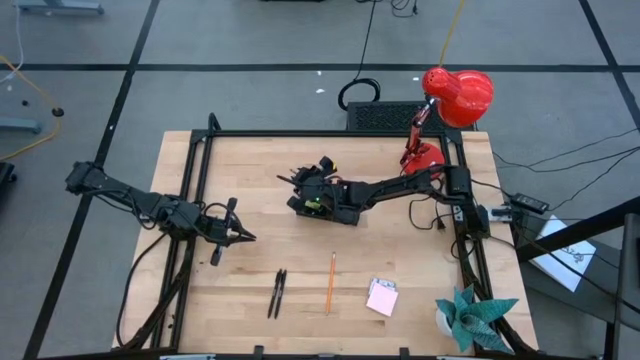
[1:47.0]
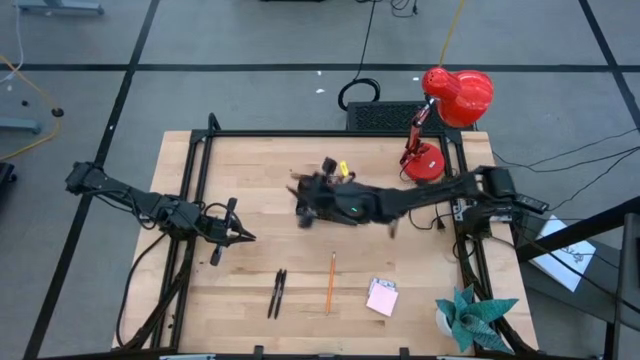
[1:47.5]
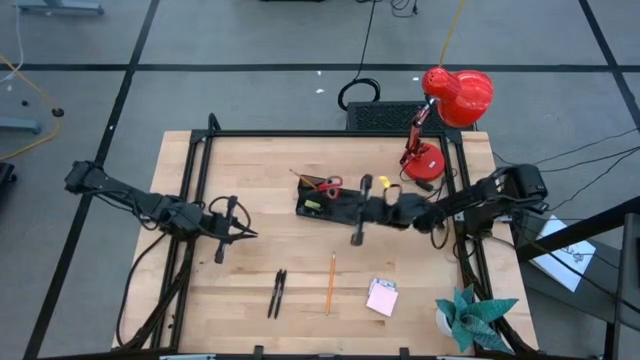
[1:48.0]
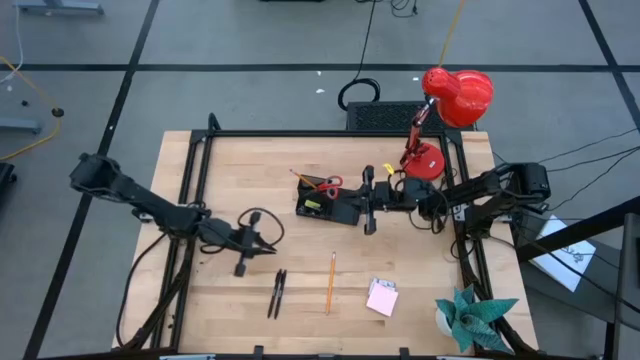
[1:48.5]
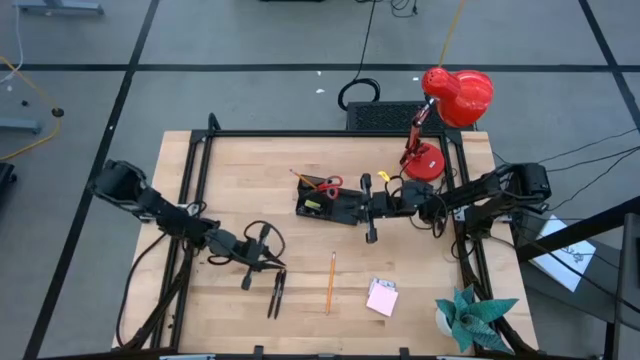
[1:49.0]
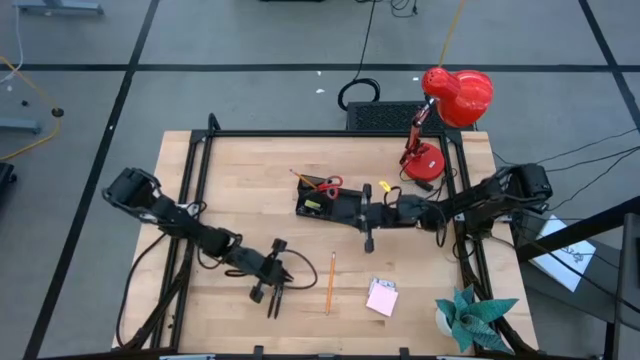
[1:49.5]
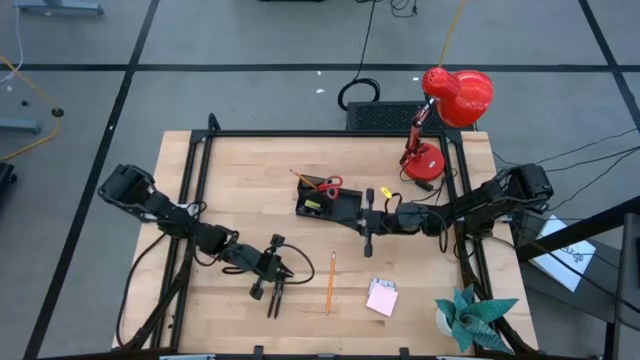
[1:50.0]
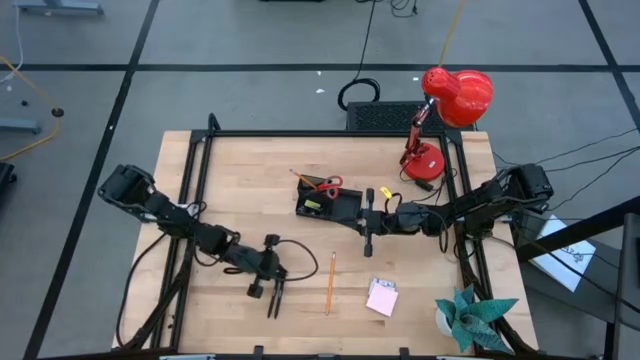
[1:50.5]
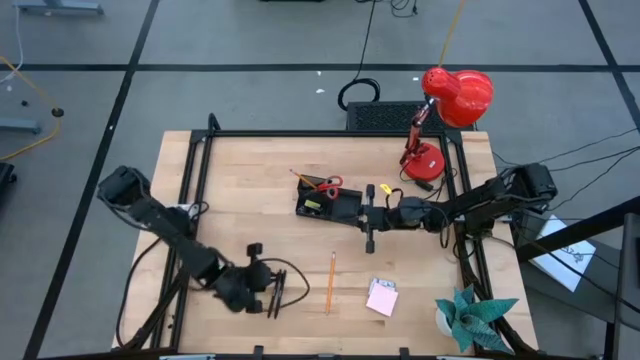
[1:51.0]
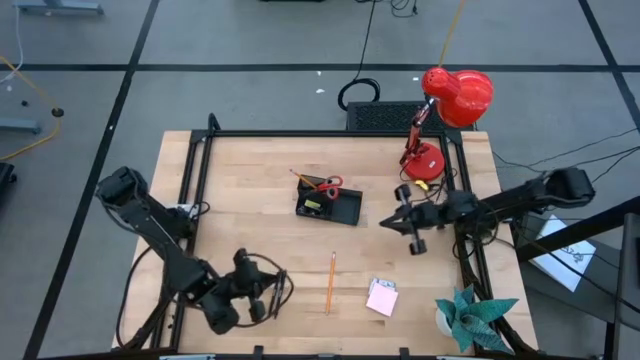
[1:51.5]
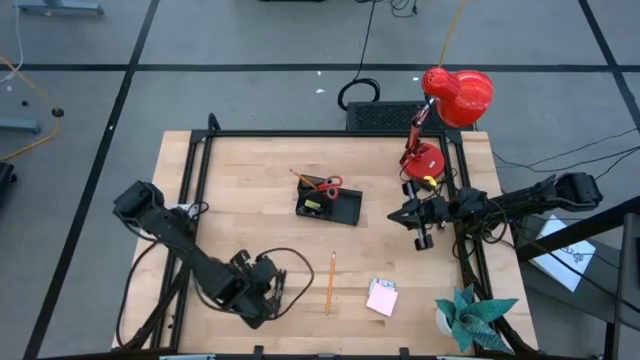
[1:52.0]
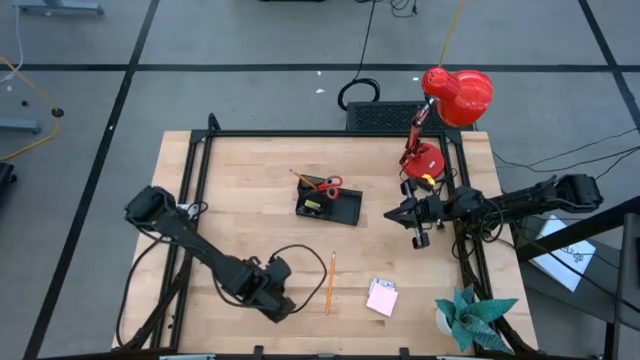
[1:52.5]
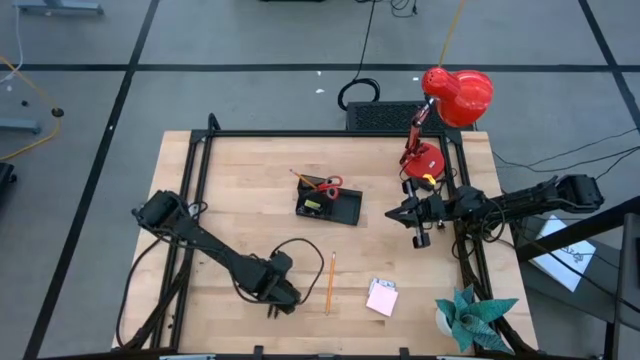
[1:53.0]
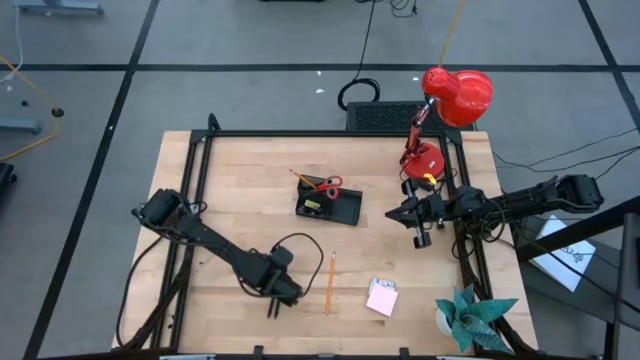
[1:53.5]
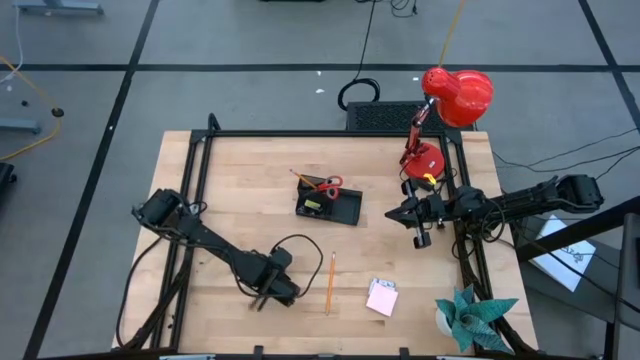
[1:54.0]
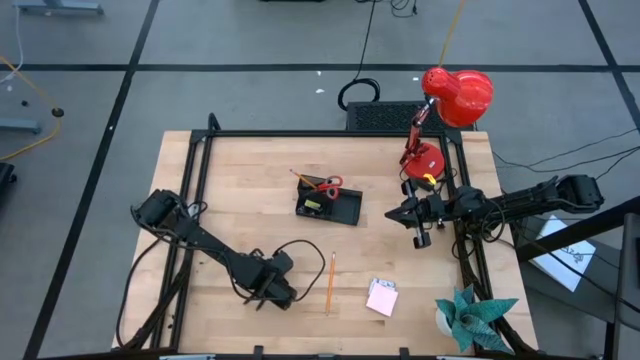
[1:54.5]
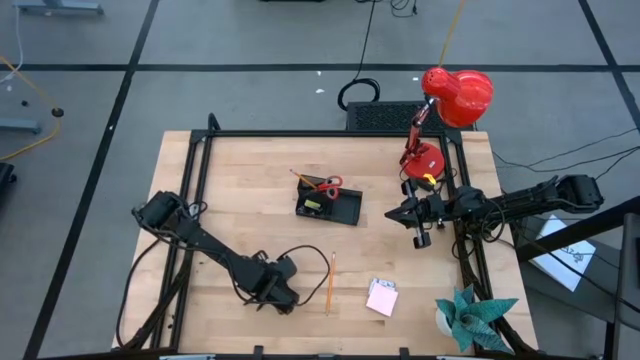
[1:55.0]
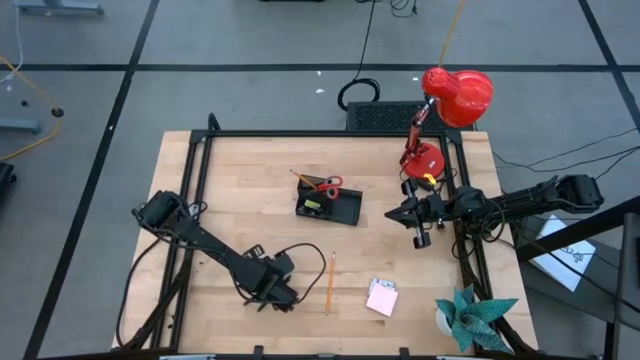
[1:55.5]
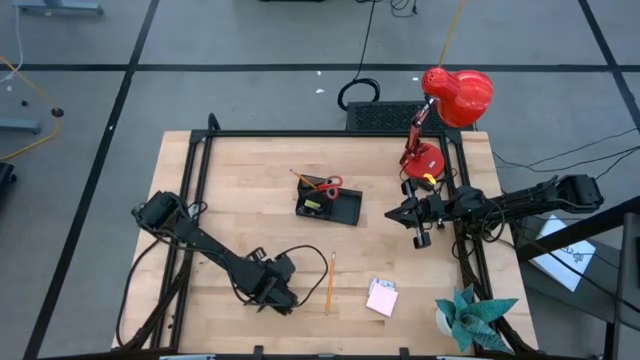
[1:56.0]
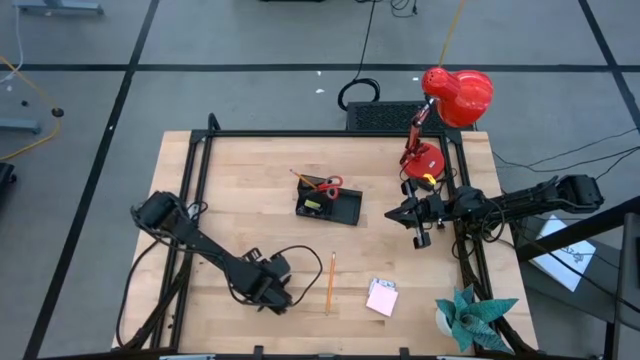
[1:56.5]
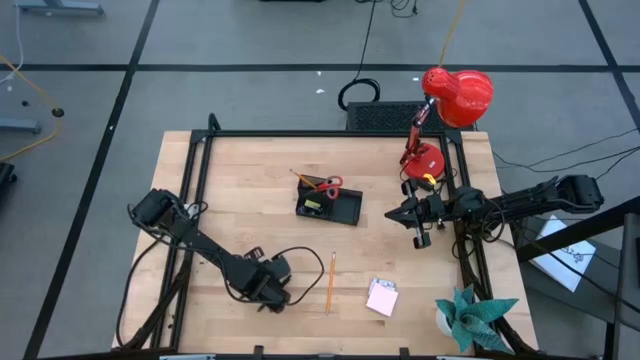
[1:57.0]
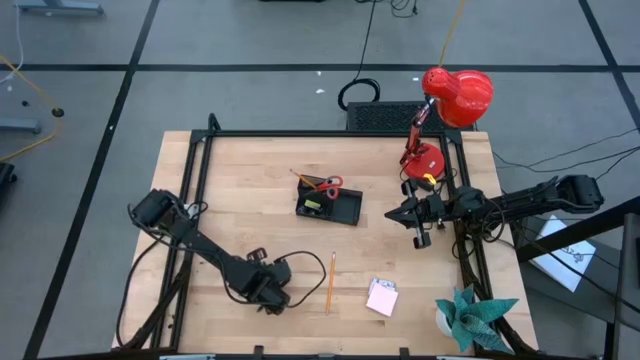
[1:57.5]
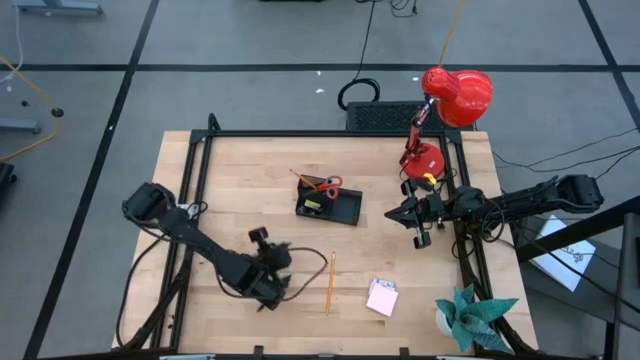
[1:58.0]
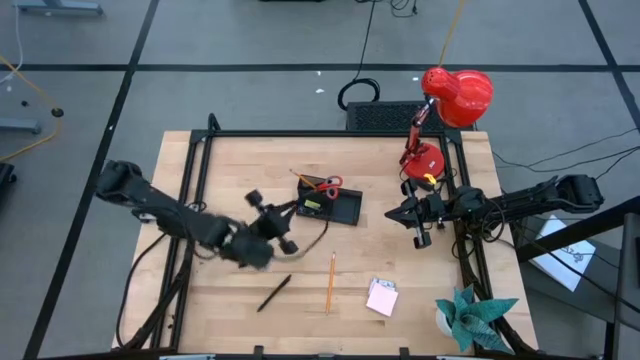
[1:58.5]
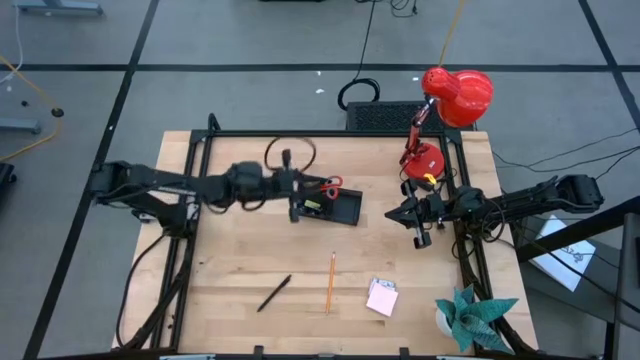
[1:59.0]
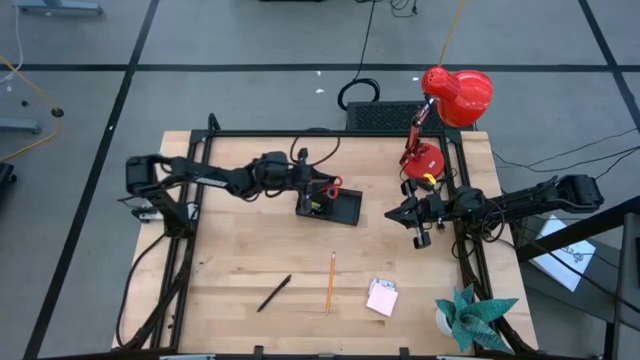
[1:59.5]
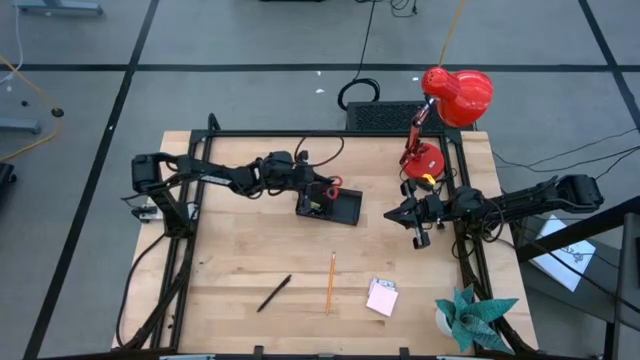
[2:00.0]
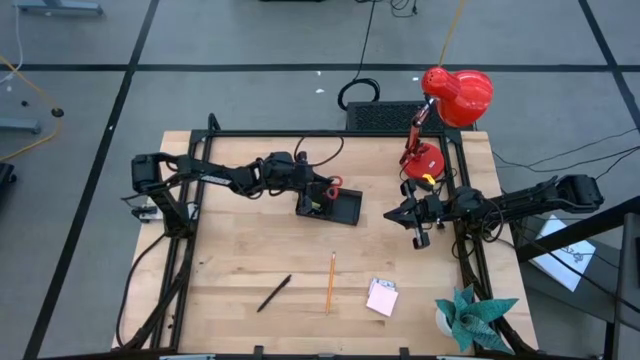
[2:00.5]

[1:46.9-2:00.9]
Task: Pick and place office supplies into organizer
Put the black pen into the desk organizer

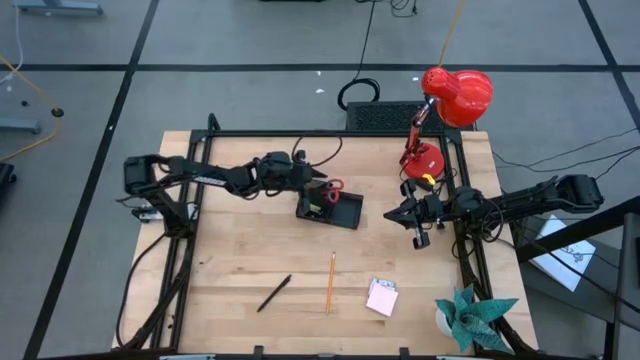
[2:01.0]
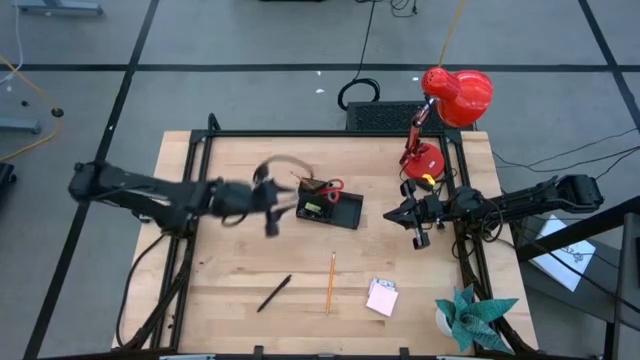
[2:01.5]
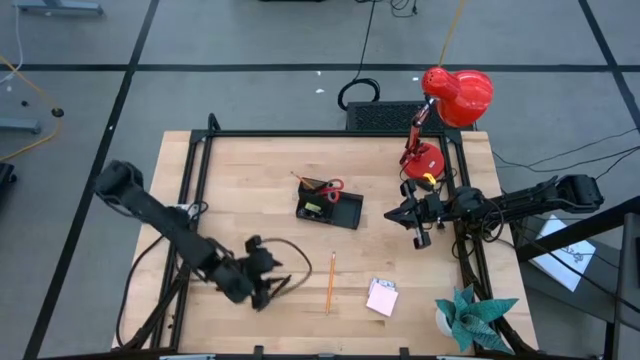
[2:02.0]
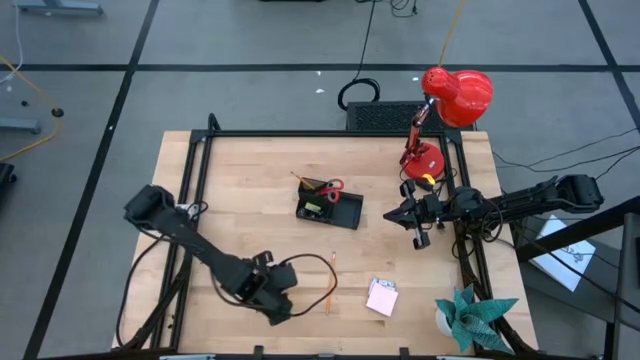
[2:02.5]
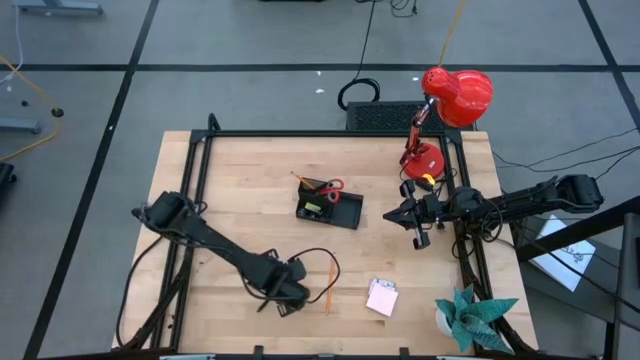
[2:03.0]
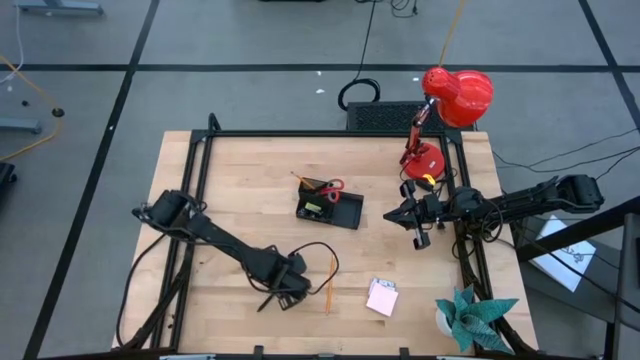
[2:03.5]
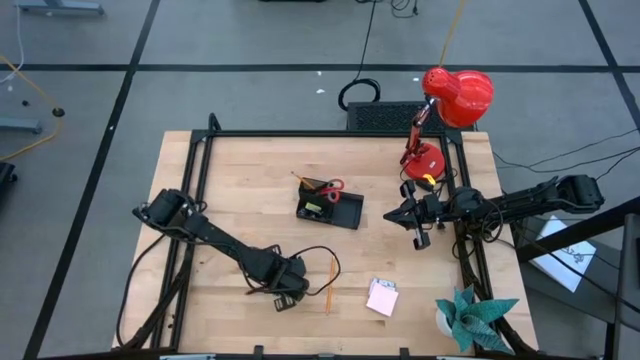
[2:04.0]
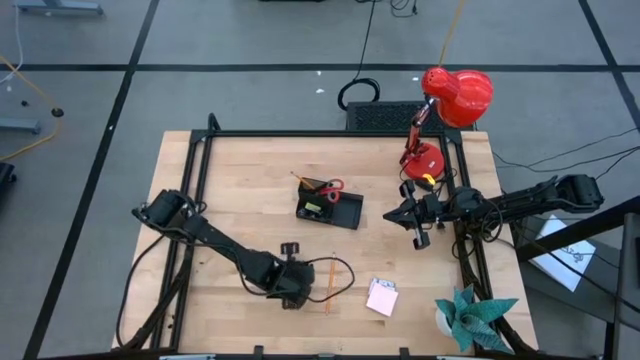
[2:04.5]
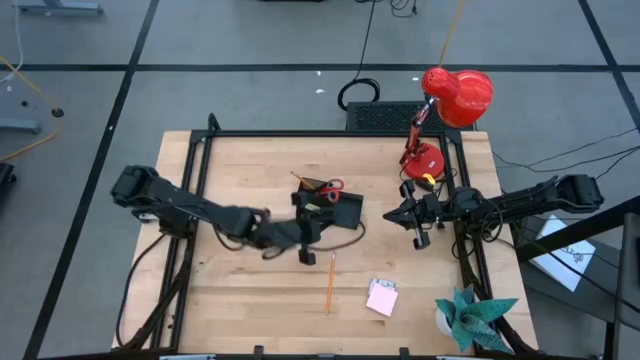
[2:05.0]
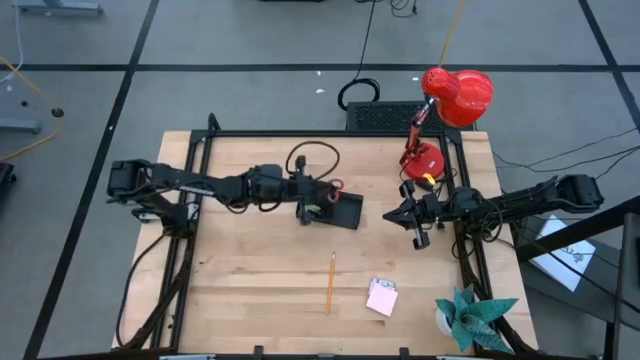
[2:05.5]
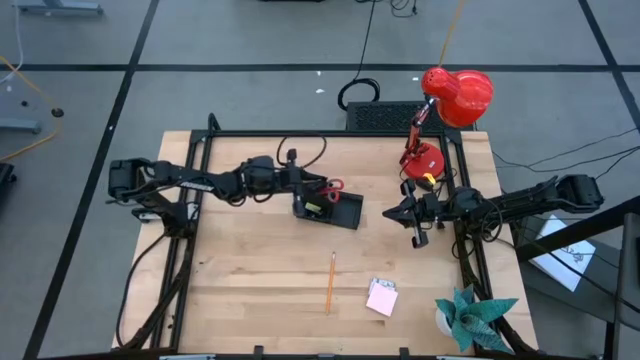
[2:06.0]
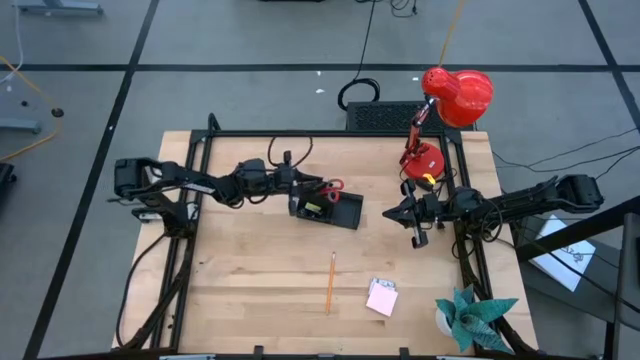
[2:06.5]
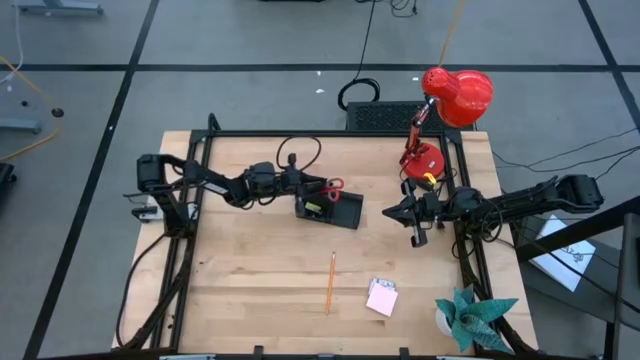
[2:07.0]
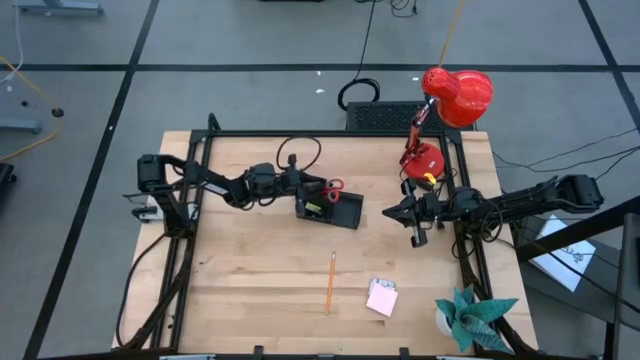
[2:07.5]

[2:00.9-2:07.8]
Put the black pen into the desk organizer

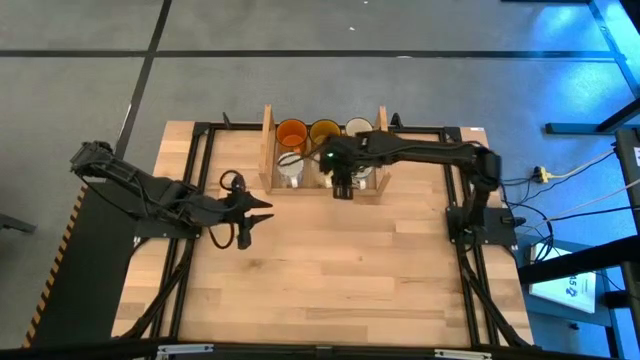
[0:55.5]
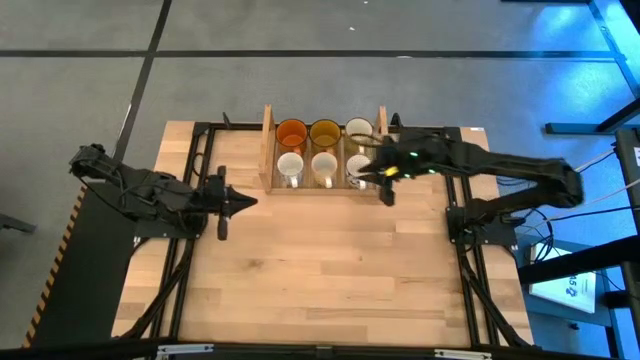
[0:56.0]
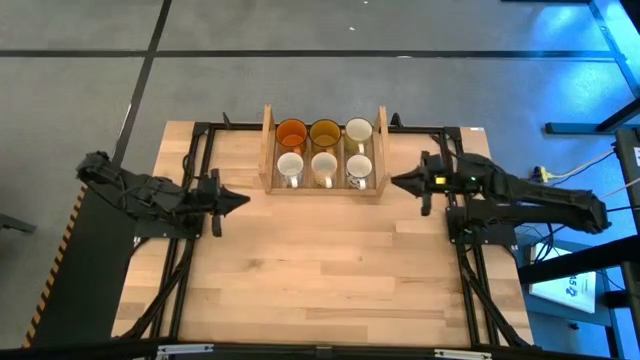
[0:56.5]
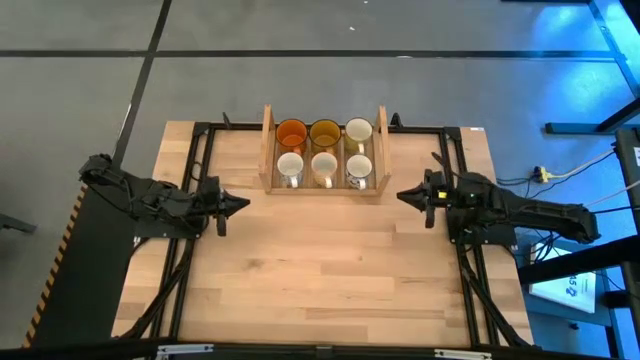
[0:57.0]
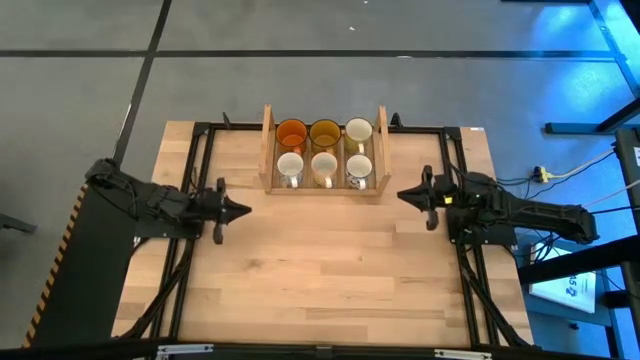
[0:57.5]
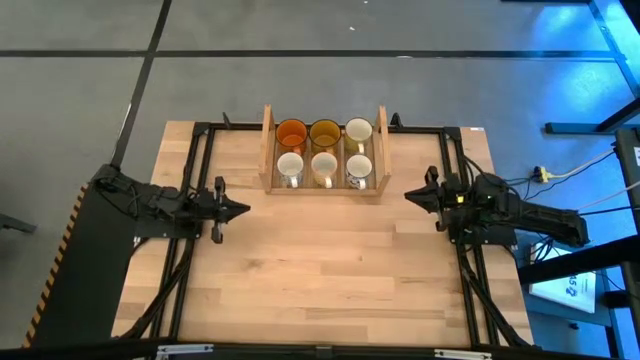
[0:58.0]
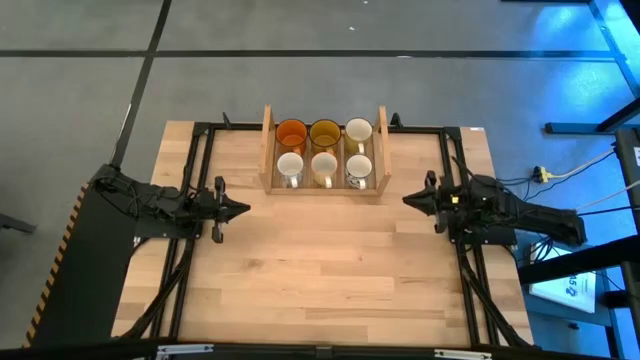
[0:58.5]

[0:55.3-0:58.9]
Task: Place coffee mugs
Return to Home Position
